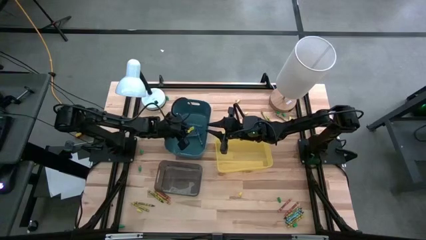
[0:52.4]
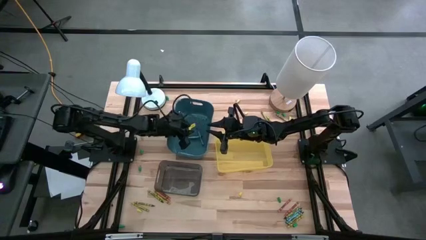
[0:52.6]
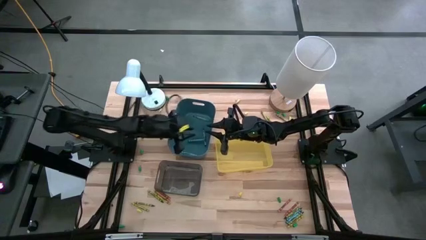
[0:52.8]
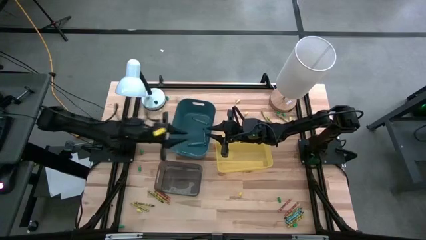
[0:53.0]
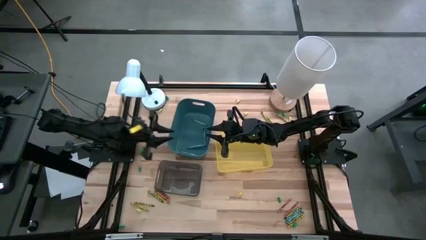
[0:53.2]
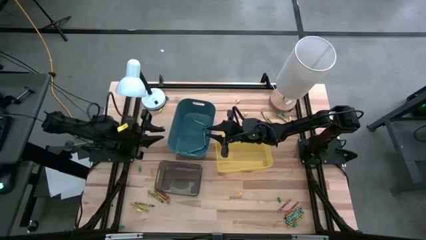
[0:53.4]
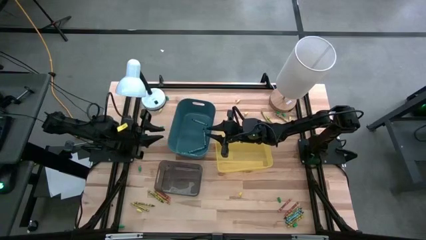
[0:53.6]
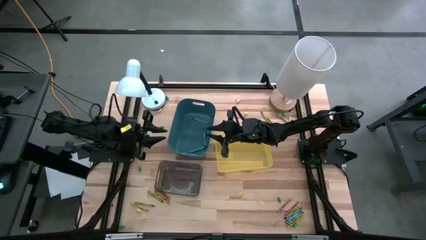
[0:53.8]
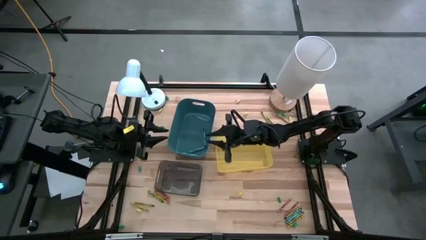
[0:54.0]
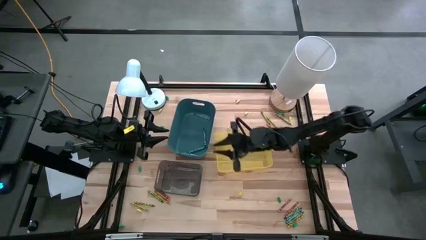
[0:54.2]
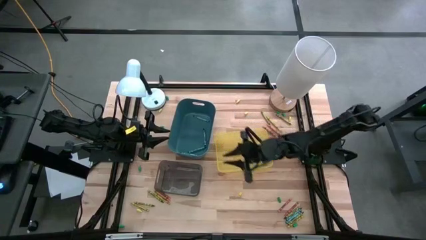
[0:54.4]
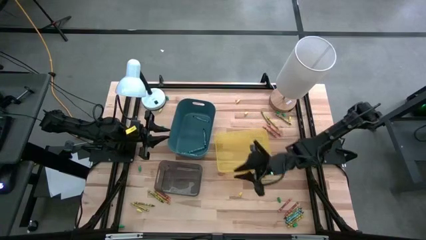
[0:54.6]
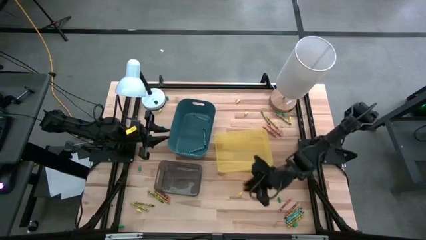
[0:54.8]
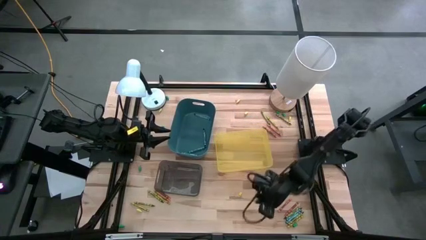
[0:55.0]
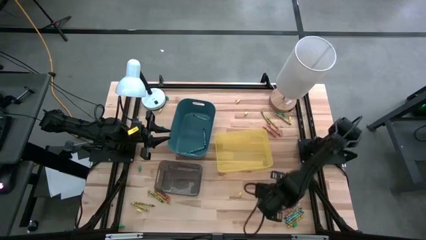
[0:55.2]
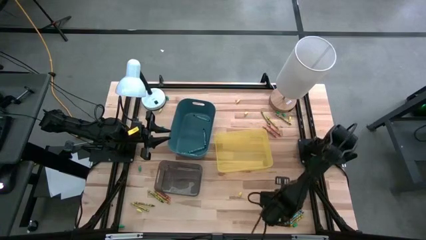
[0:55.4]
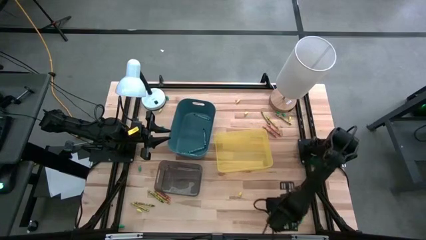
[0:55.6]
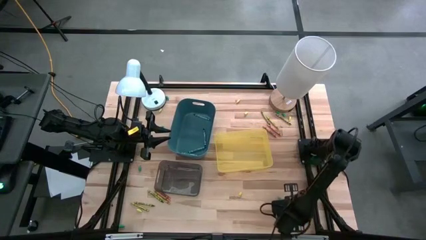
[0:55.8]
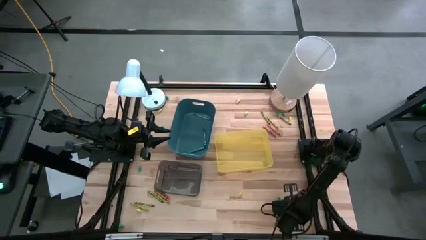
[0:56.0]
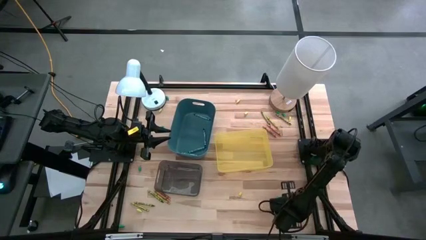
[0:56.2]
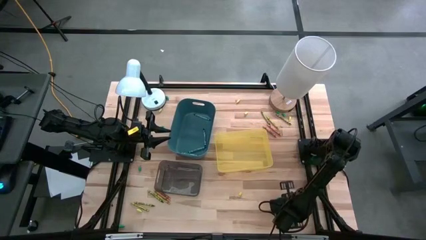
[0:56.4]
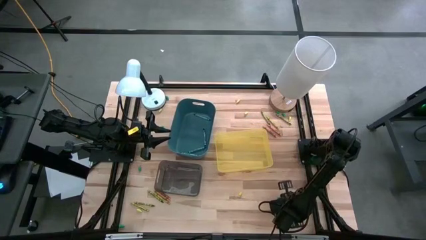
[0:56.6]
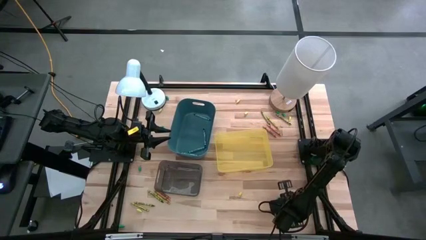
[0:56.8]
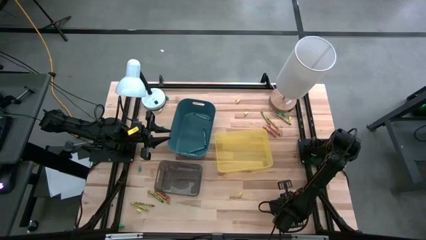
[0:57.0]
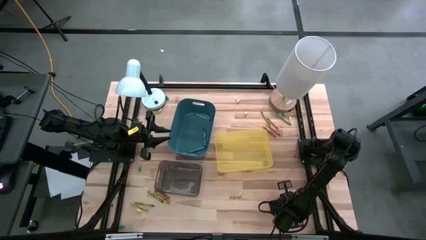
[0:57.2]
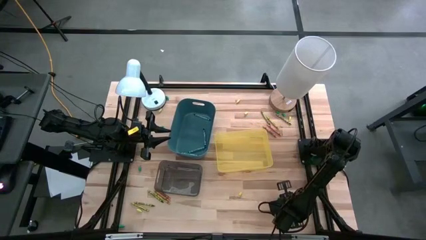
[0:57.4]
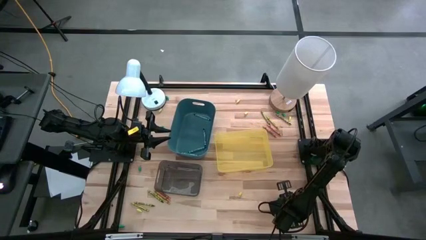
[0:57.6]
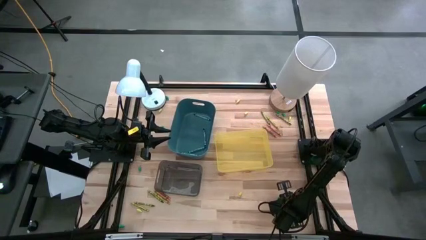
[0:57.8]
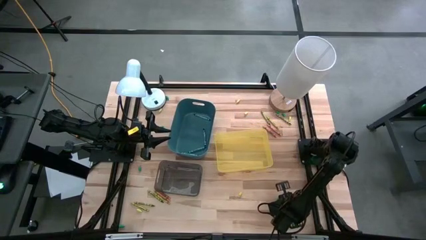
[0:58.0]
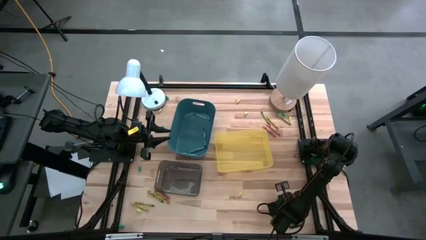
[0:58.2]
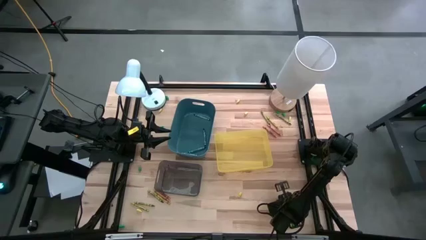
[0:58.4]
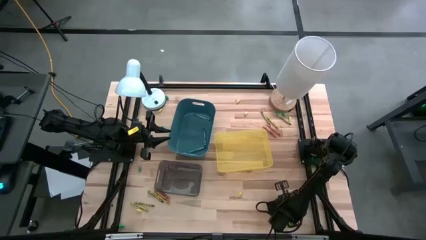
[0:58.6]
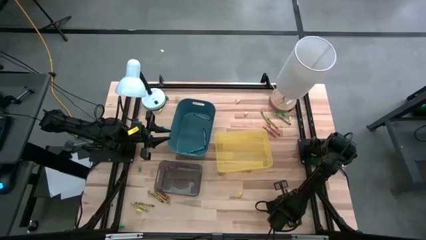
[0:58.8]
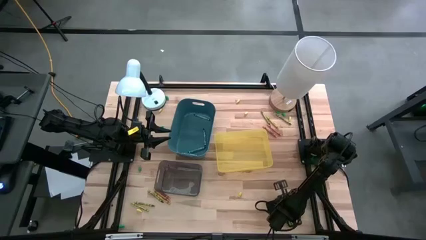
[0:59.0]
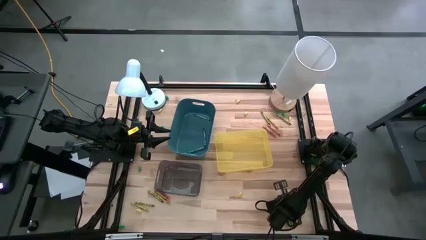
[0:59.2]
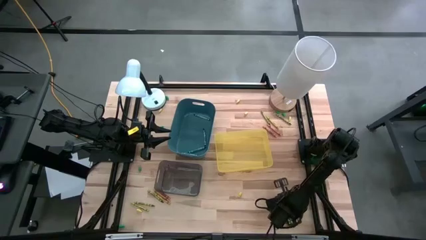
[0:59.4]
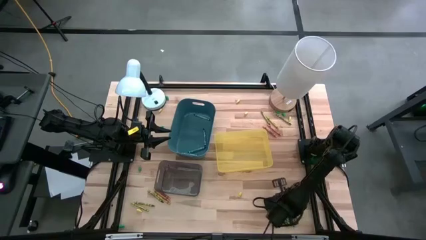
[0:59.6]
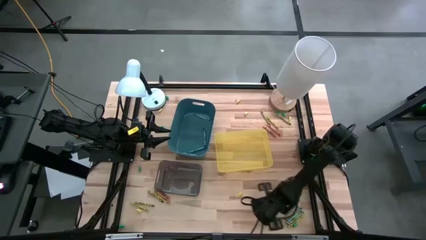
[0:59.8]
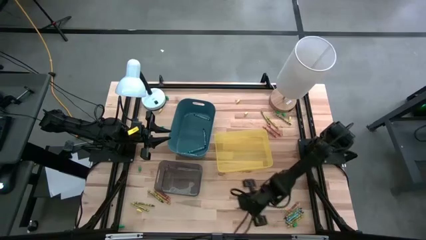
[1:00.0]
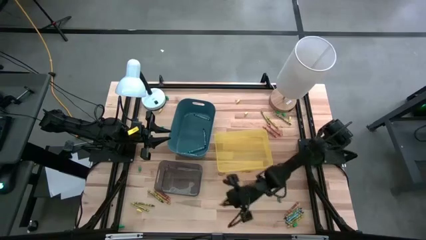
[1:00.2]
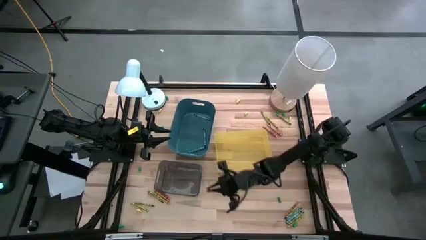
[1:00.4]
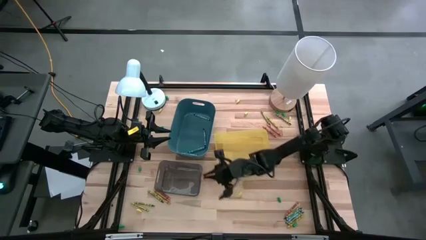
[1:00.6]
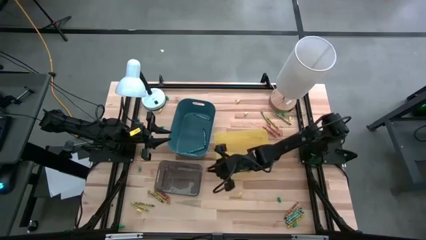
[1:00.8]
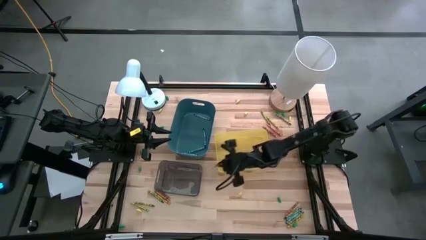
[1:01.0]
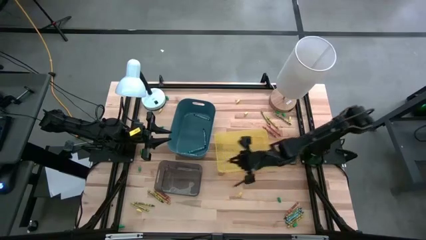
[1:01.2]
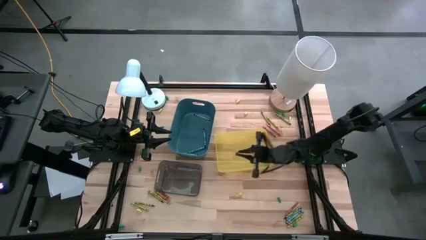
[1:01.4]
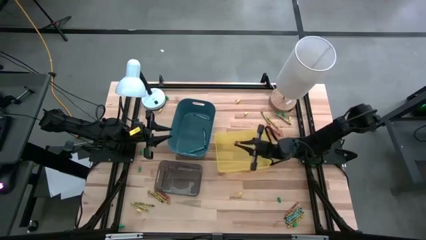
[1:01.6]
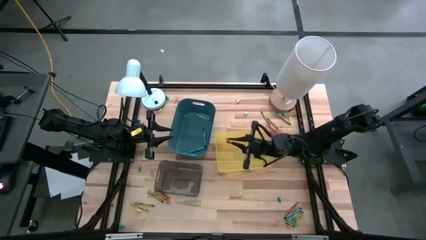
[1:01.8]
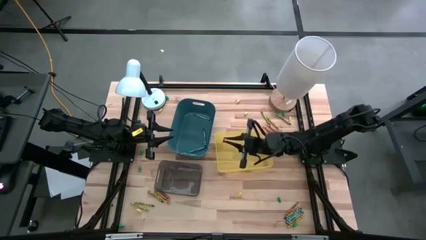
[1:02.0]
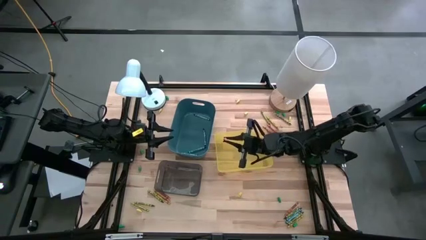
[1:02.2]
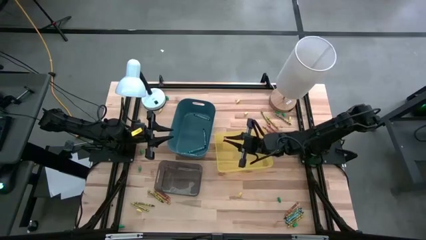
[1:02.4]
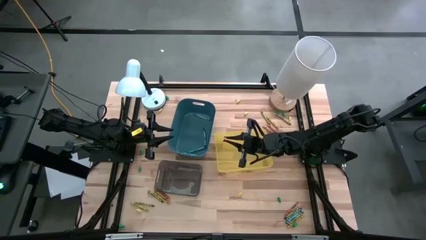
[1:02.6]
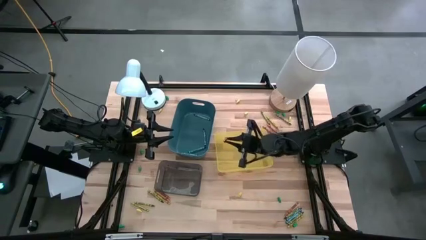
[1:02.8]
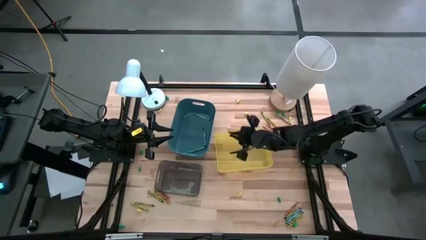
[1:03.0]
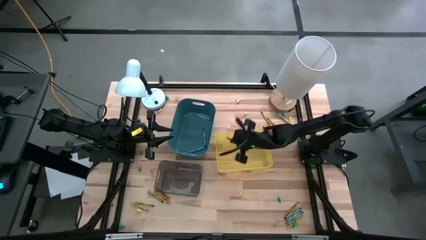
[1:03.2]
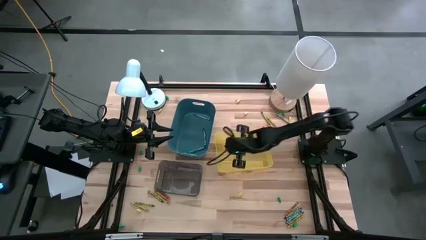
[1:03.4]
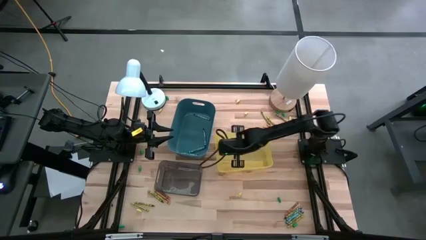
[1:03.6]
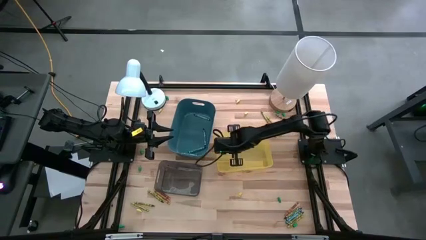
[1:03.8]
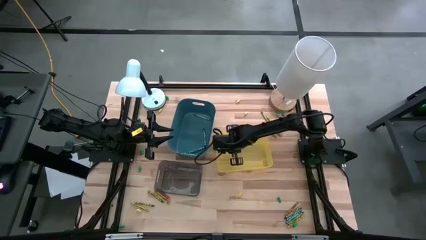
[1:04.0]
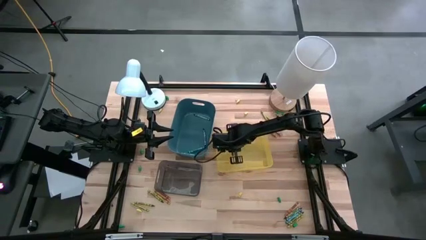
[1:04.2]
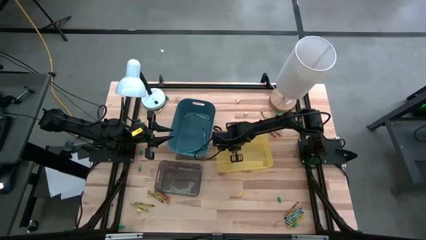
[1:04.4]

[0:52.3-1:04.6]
Task: Sort crayons
Put the orange crayon into the yellow bin

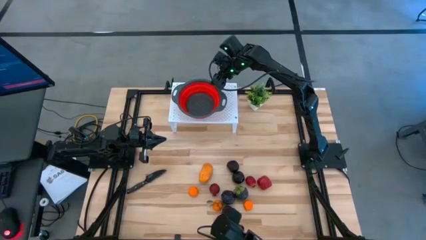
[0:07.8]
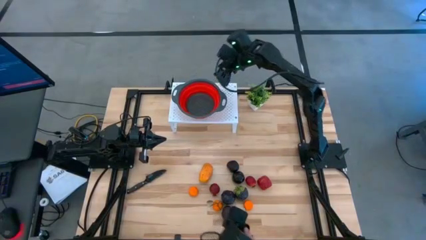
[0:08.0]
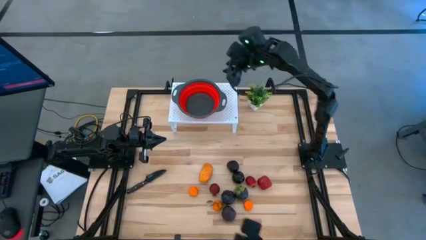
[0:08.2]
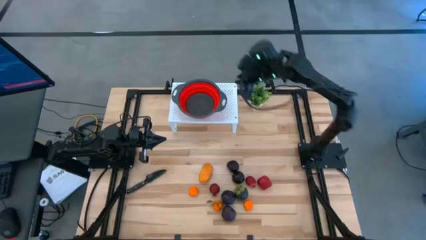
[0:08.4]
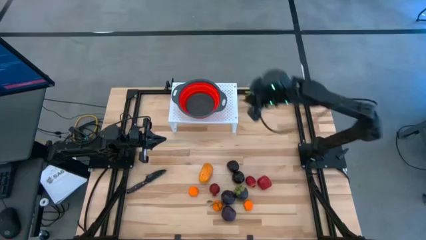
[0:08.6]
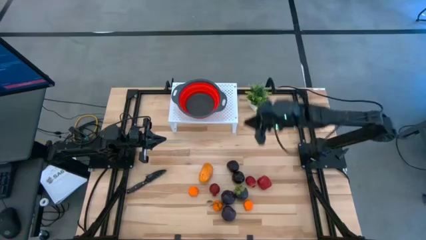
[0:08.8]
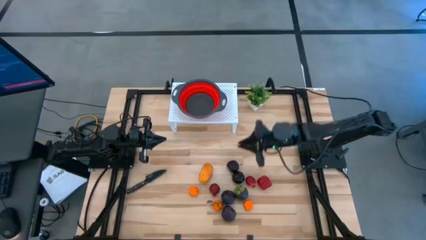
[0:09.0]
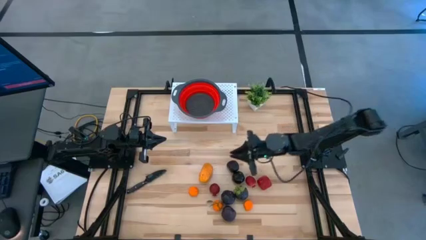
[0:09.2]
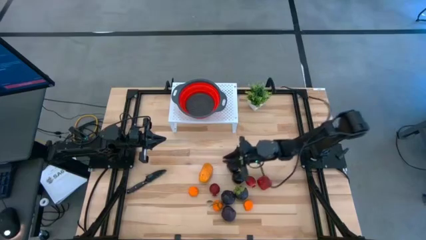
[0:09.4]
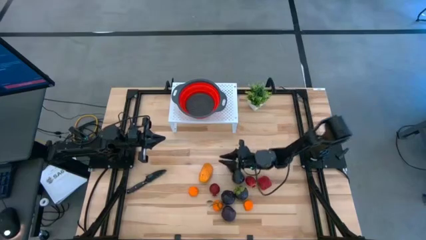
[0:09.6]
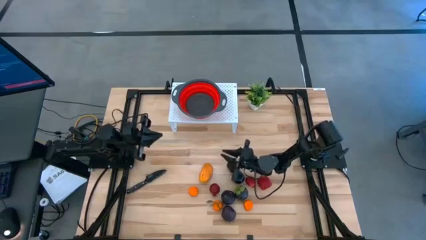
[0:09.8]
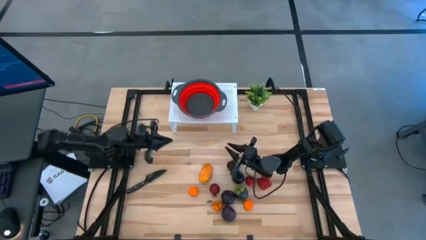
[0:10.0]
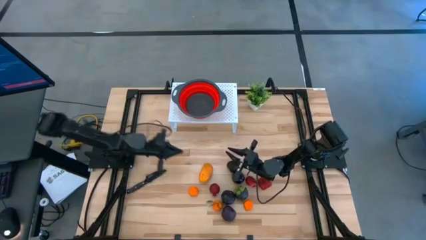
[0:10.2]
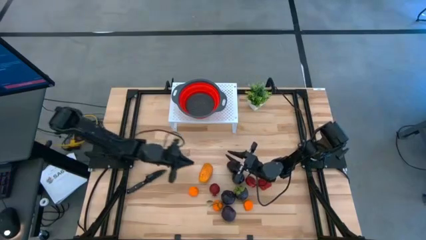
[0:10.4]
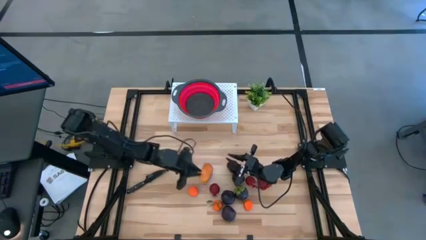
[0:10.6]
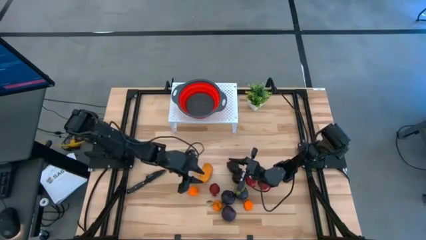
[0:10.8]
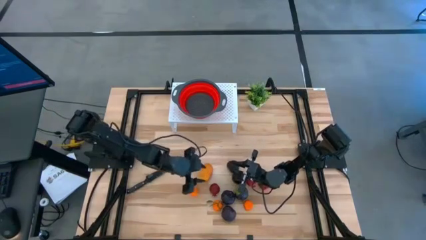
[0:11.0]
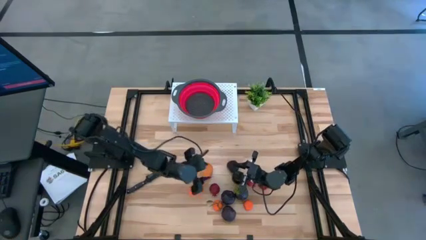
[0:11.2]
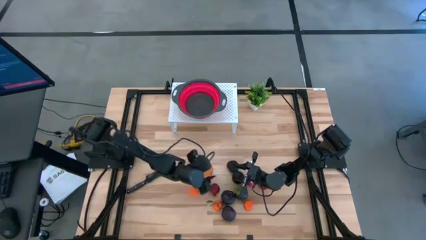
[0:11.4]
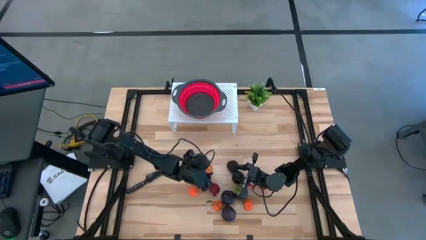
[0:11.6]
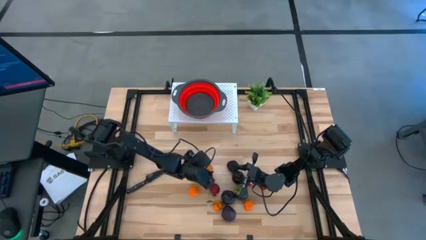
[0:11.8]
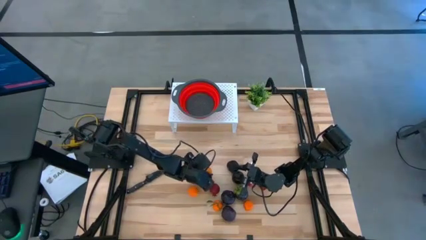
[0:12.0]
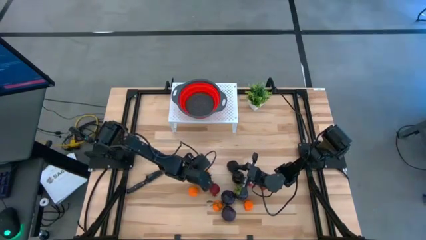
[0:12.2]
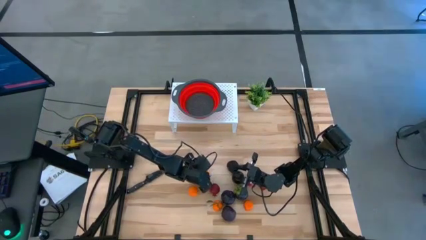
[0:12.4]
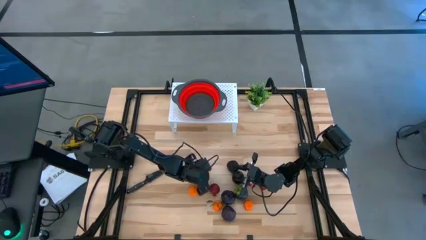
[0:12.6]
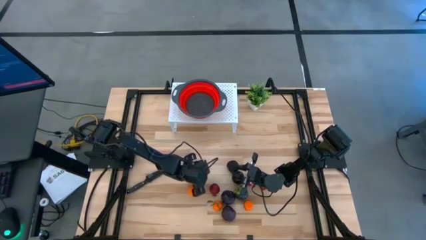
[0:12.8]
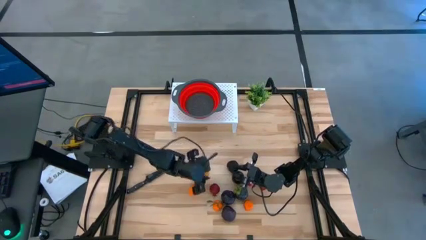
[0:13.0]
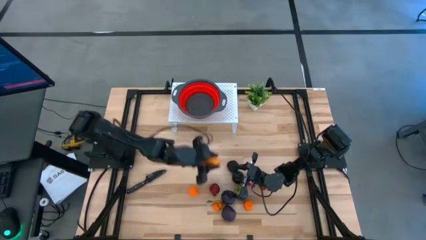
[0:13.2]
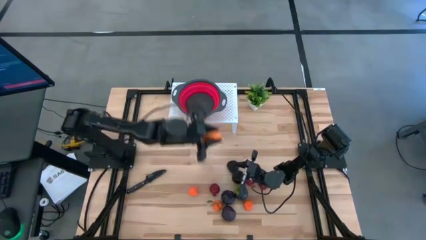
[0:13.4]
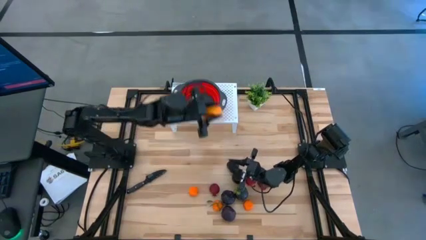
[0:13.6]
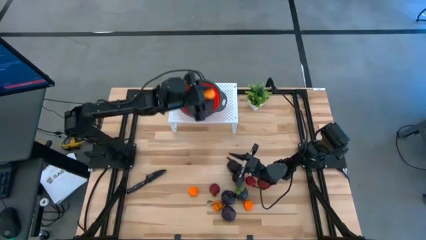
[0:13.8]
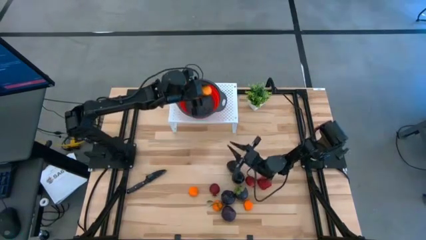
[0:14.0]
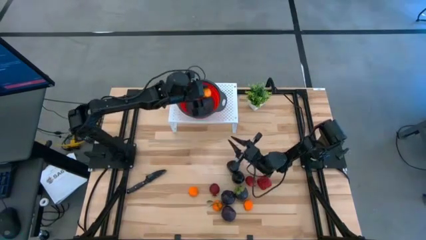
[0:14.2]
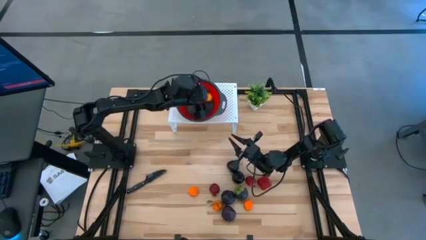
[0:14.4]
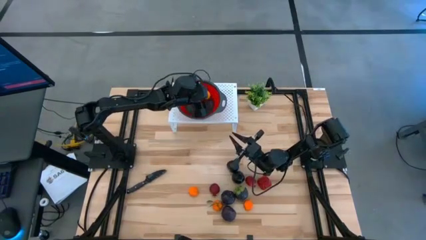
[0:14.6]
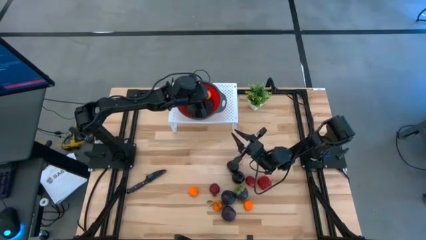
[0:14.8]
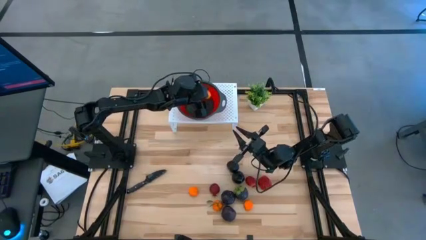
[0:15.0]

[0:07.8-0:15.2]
Task: Pick & Place Fruit
Put the yellow mango into the red strainer bowl on the shelf
